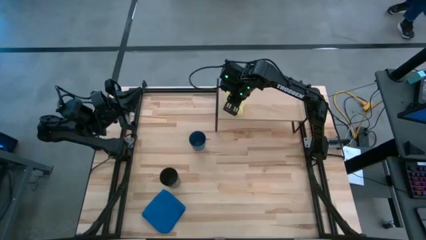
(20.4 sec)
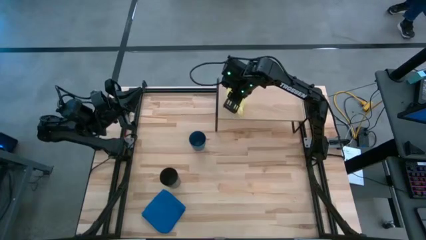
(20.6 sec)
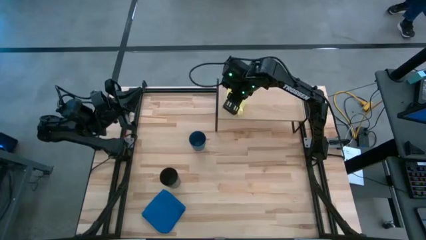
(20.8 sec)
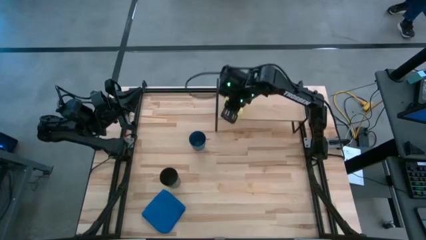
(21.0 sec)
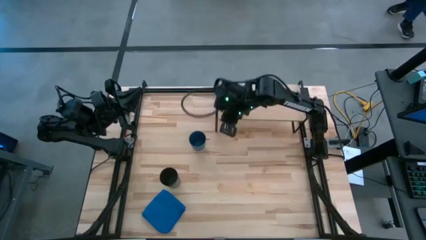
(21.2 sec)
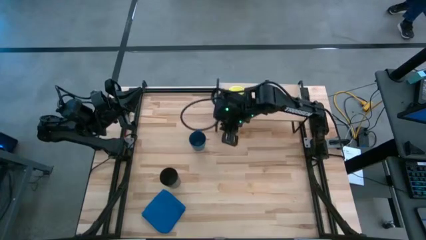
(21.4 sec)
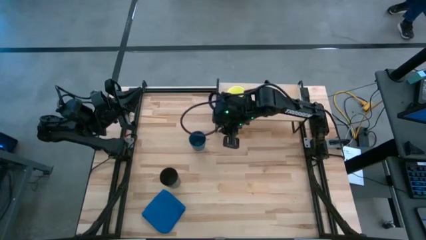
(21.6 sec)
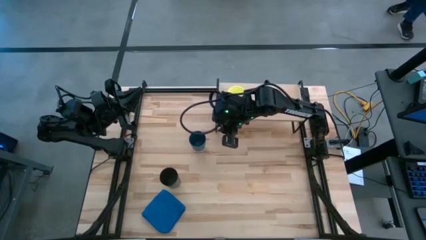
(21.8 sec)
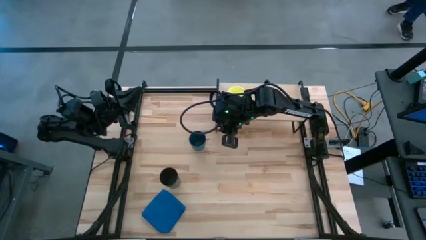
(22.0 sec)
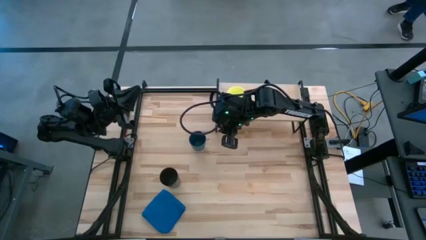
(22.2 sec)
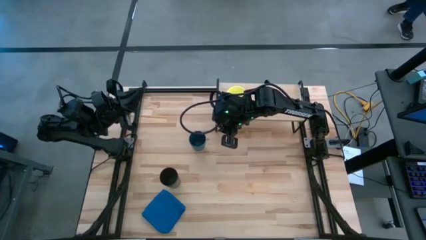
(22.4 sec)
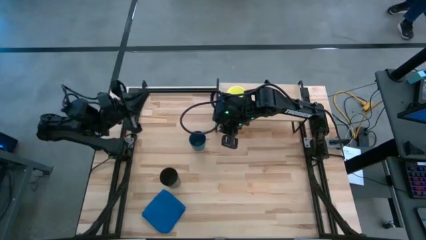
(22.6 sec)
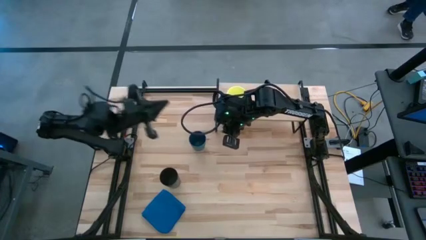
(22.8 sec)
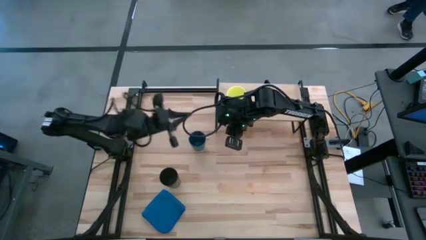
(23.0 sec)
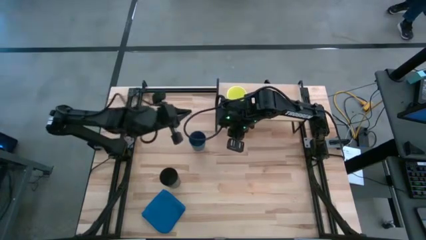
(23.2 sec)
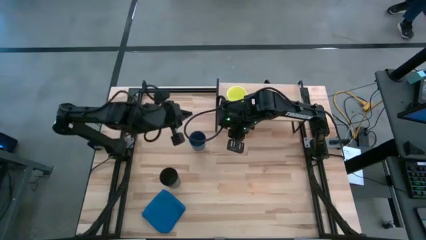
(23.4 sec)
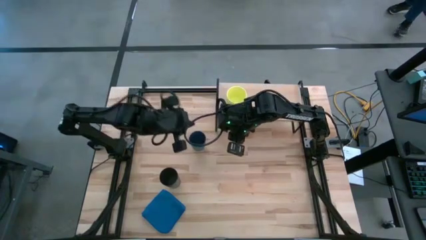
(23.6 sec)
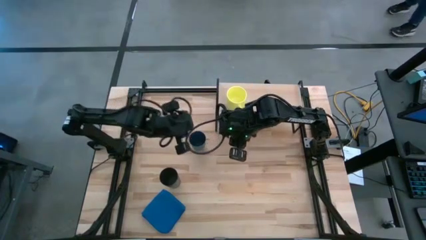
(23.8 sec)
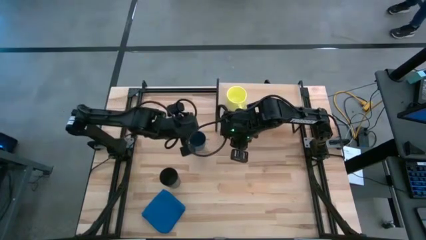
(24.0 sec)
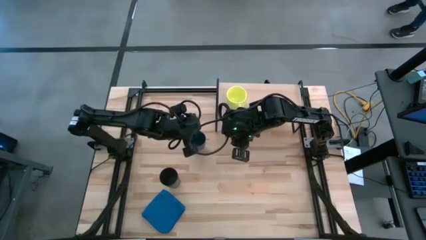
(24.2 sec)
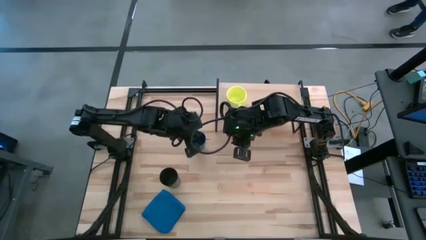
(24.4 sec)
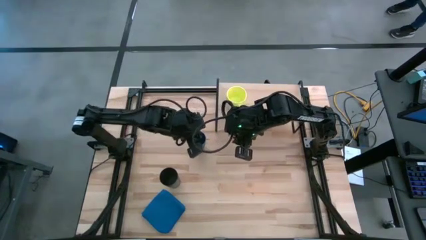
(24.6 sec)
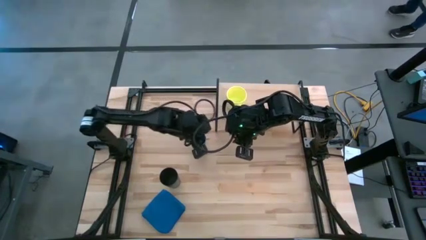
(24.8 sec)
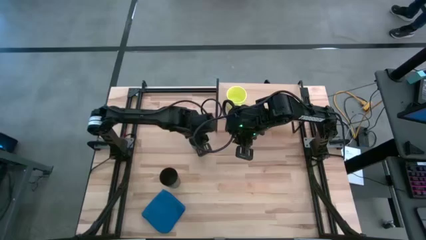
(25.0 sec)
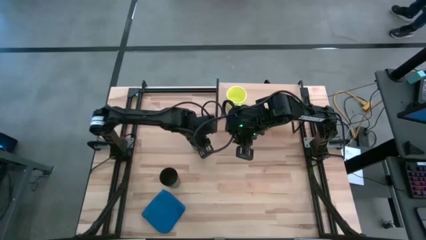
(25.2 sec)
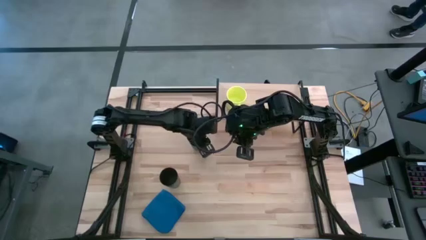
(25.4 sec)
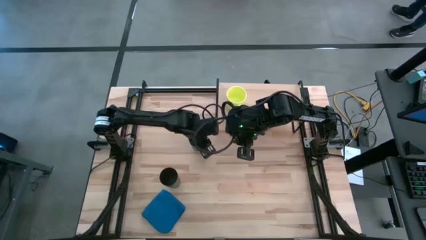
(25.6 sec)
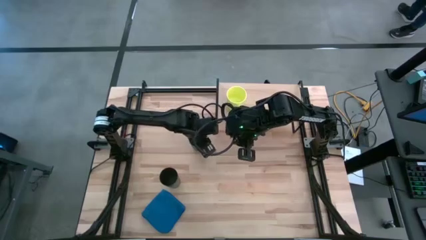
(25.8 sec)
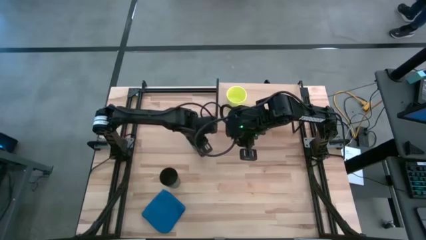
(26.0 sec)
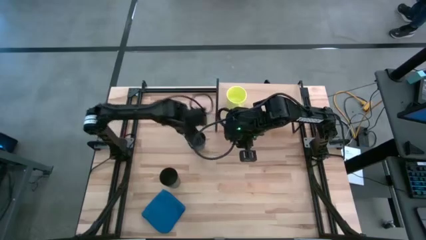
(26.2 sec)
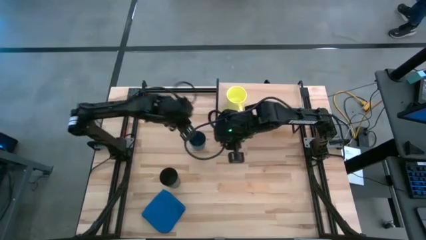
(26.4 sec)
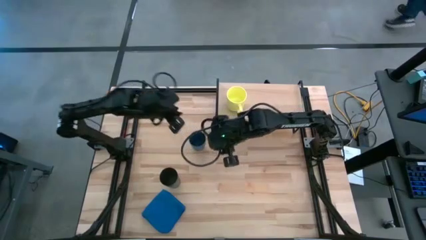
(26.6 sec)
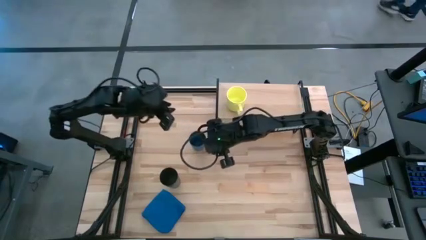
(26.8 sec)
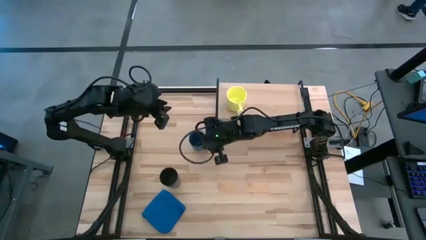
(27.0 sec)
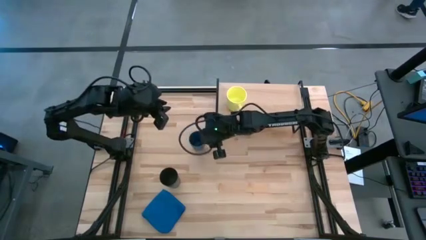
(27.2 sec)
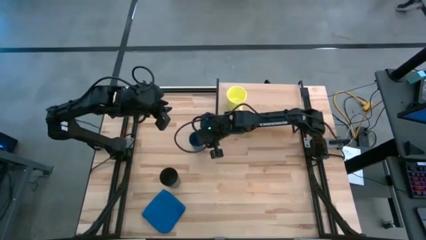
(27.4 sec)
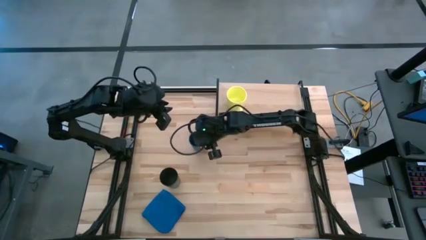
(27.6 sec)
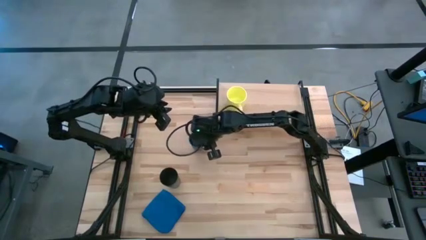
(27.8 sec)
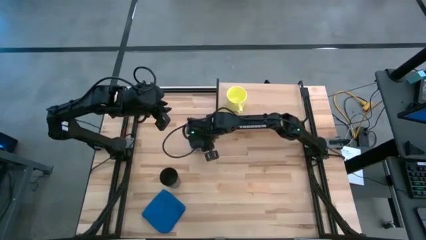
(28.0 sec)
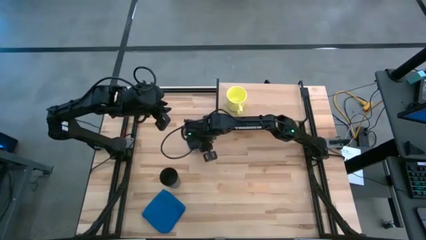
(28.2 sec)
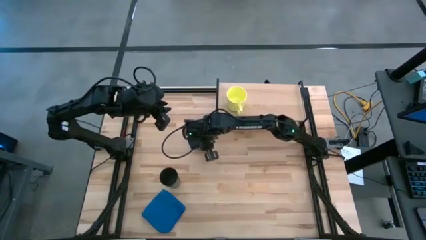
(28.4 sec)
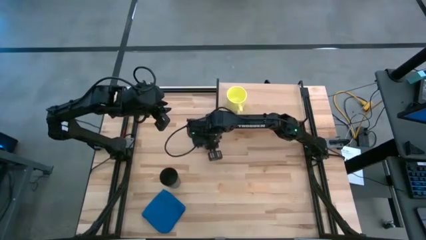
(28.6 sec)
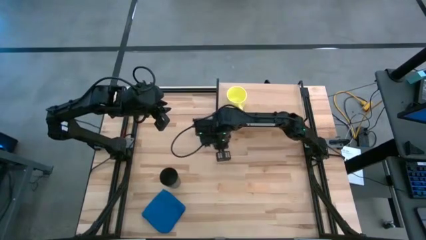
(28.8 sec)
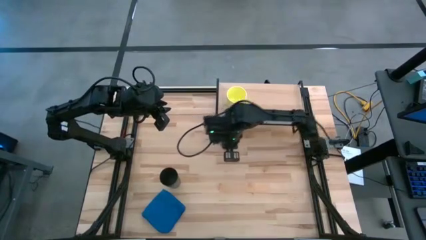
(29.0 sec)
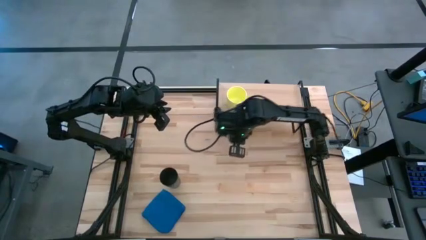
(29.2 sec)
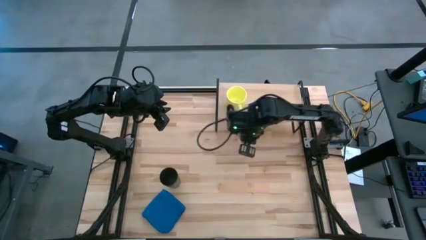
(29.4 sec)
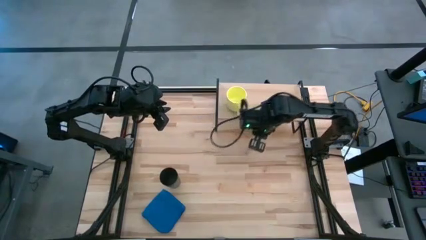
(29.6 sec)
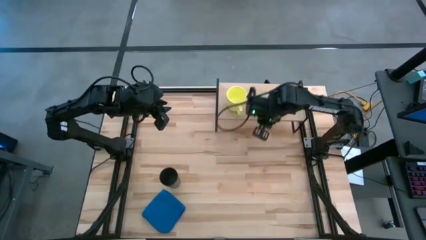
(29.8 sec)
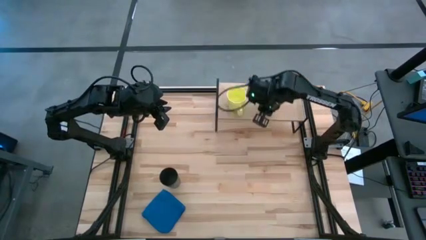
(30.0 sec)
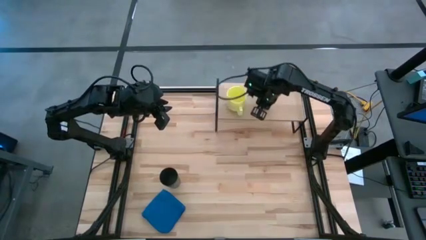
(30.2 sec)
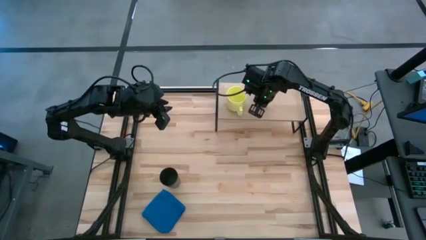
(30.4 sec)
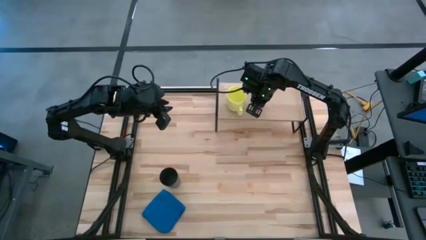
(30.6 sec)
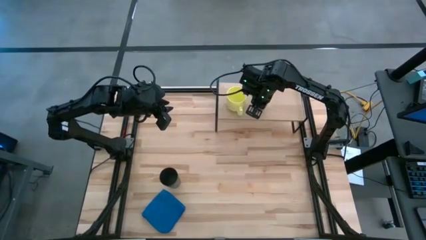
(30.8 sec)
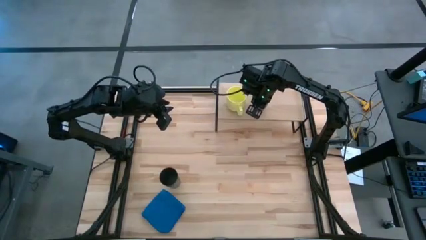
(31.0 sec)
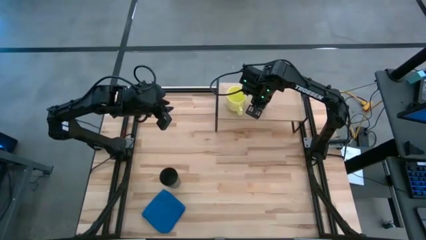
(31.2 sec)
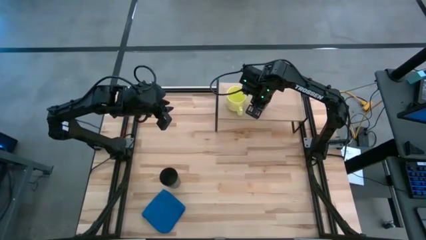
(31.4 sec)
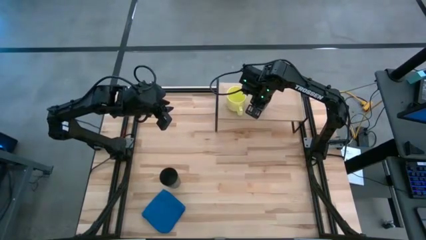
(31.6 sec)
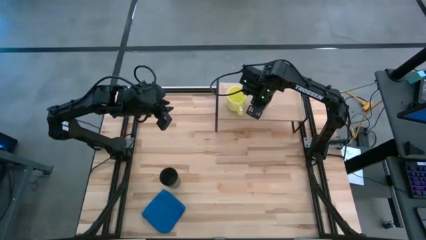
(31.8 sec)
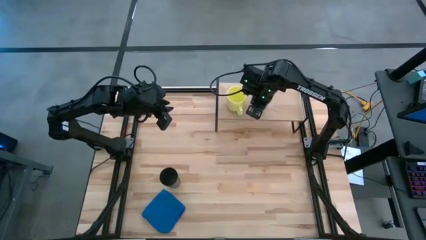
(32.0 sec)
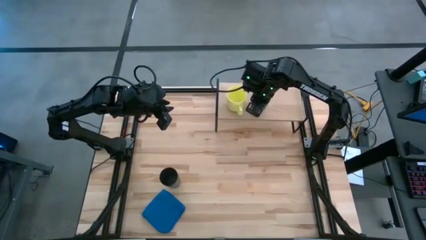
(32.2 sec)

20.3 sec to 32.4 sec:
Task: Stack small to large cups/mugs on shelf
Put the blue cup on the shelf

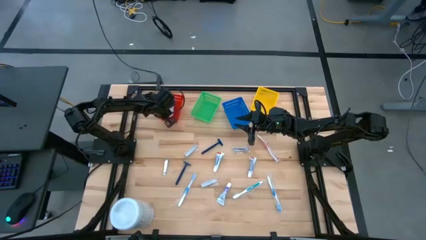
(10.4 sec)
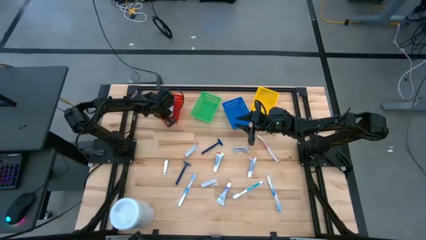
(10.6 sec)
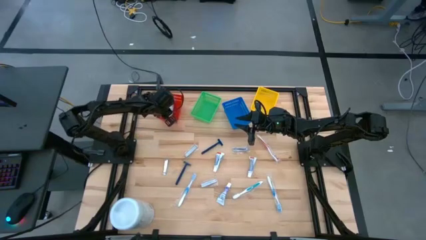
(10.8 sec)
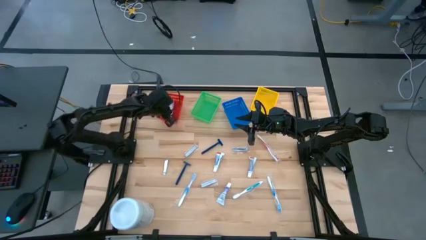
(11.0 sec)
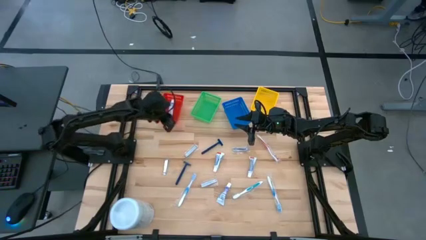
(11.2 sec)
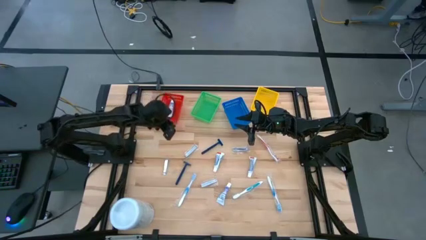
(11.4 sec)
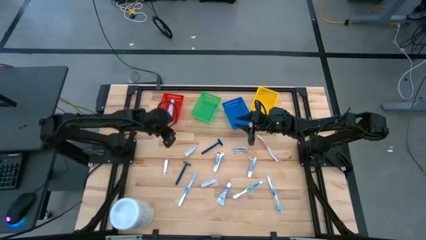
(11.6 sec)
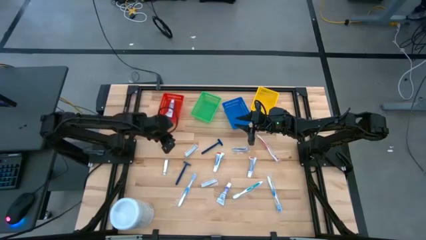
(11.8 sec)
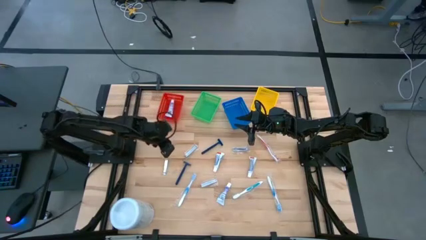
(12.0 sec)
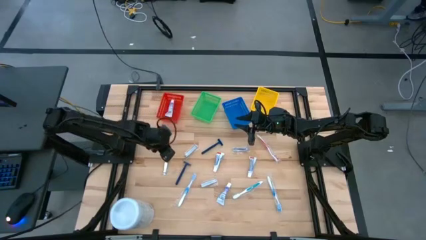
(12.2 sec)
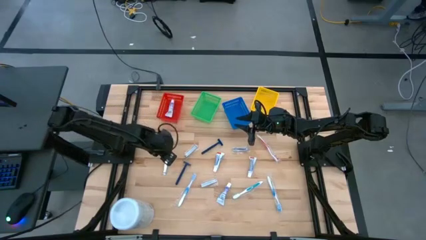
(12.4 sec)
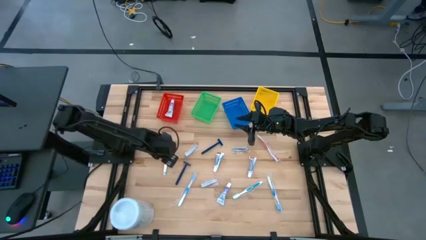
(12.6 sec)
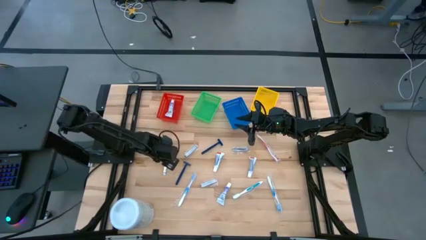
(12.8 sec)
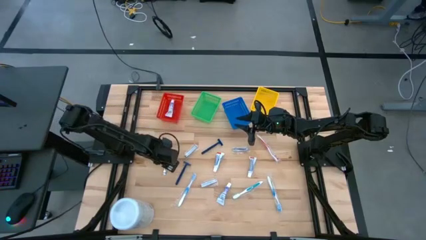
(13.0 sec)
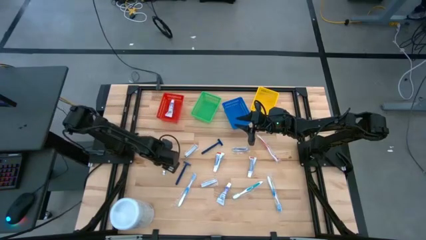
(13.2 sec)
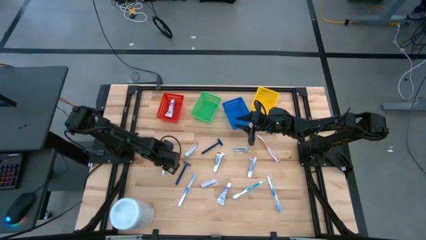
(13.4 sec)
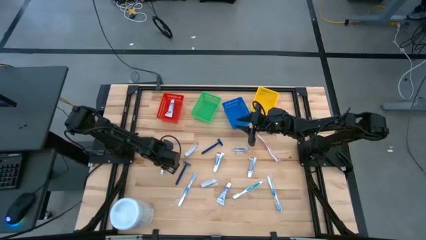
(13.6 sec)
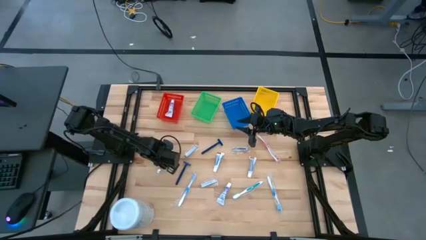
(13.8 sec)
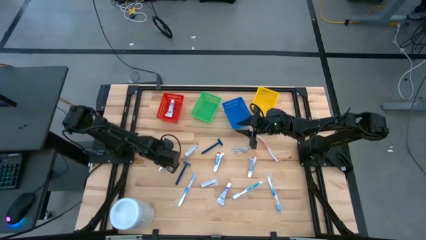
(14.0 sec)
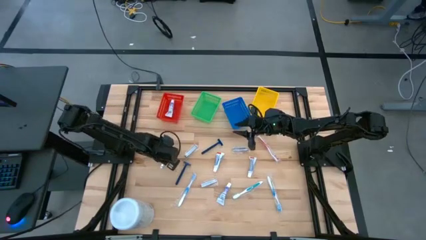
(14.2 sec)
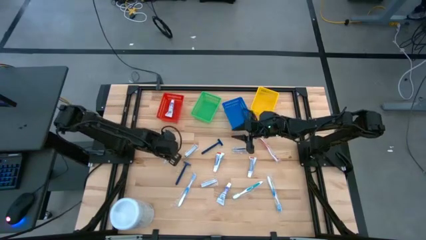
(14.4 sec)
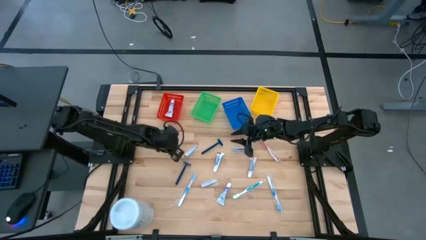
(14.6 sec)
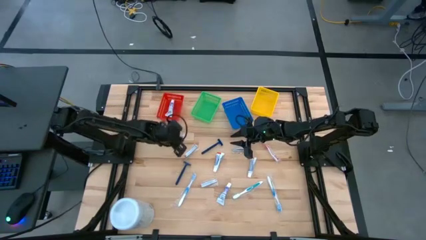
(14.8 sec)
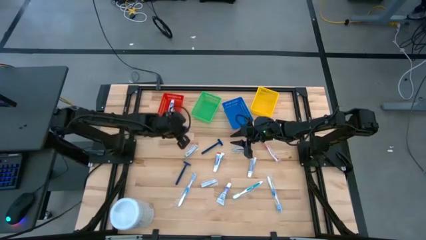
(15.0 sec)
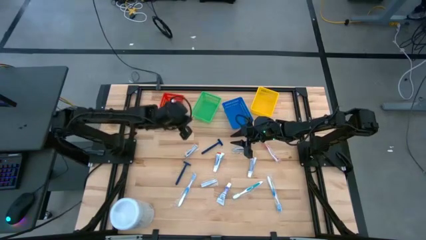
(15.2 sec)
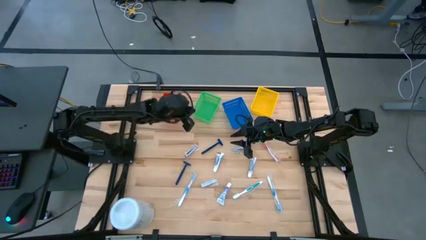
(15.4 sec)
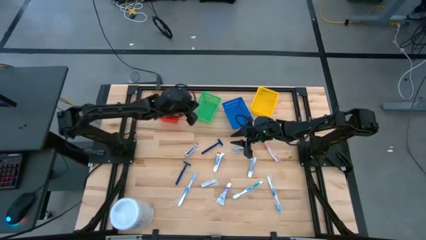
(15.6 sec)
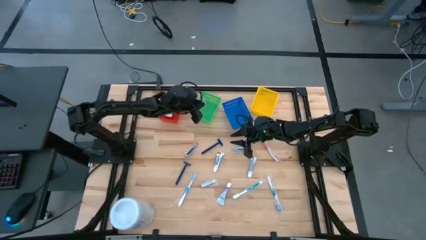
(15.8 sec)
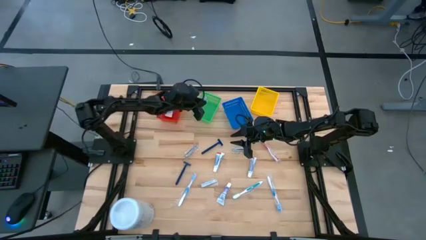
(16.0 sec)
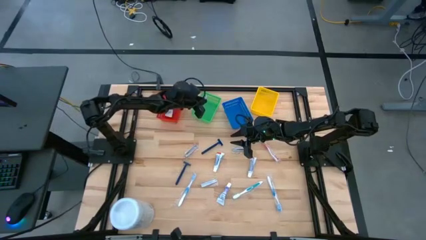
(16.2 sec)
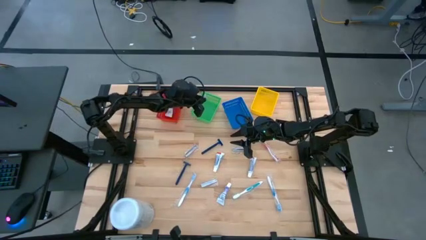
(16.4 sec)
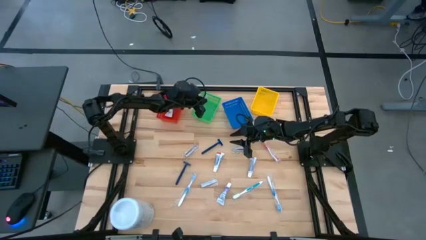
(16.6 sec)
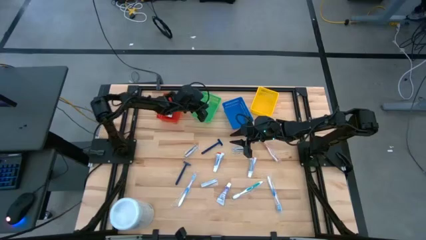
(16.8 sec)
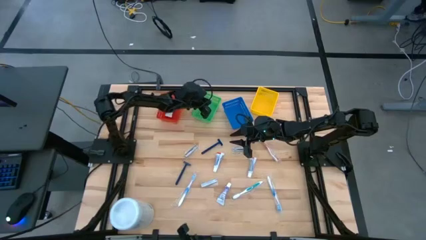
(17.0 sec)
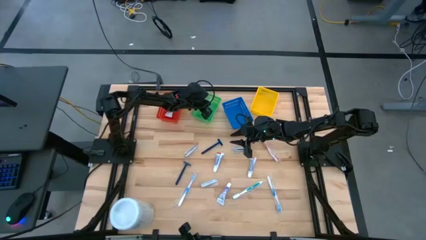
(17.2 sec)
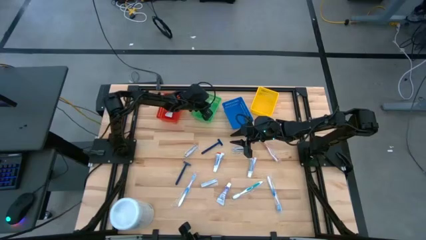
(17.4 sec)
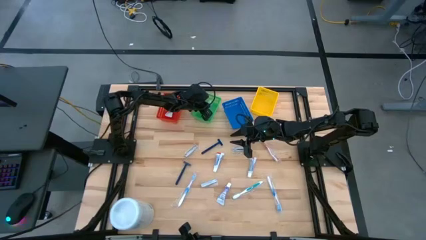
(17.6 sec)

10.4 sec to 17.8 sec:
Task: Pick & Place Travel size toiletries
Put the silver nail cutter in the green bin
